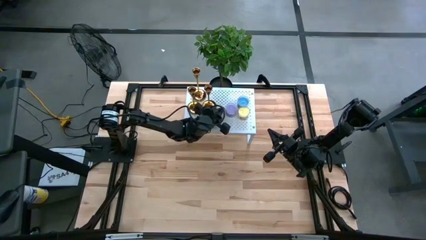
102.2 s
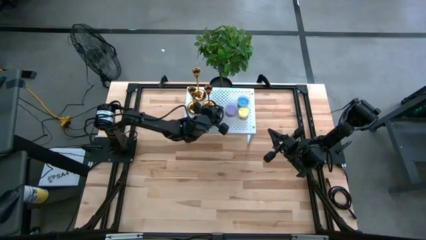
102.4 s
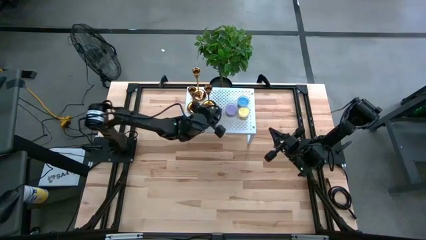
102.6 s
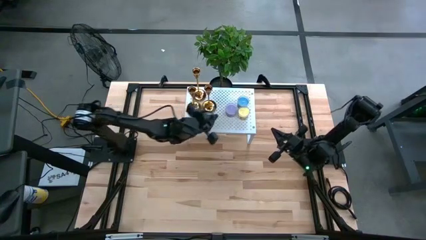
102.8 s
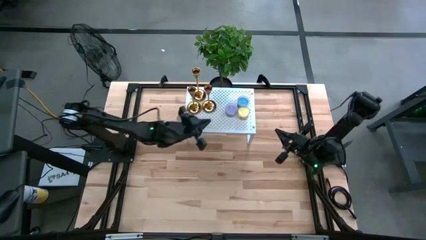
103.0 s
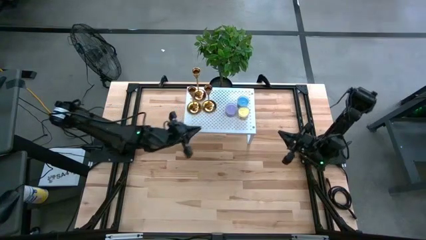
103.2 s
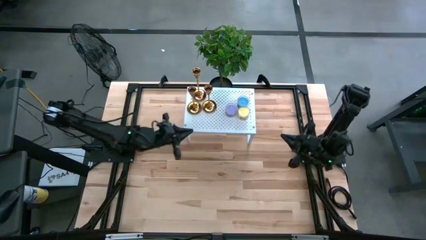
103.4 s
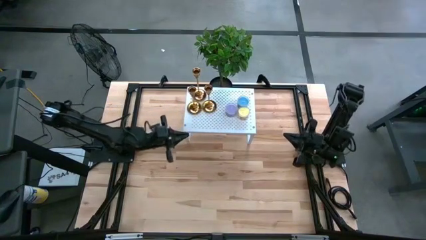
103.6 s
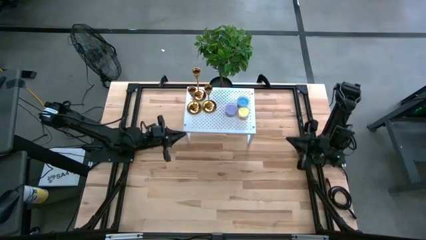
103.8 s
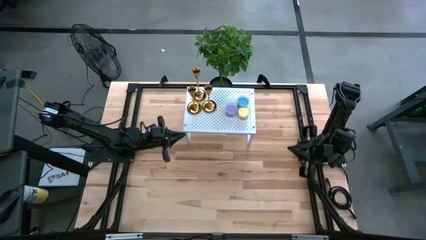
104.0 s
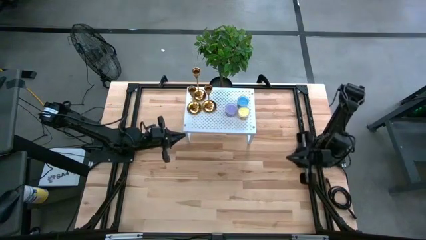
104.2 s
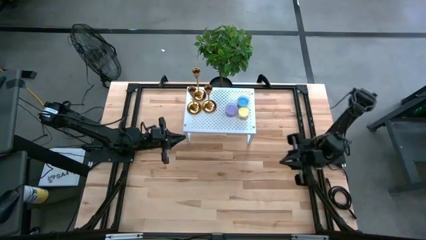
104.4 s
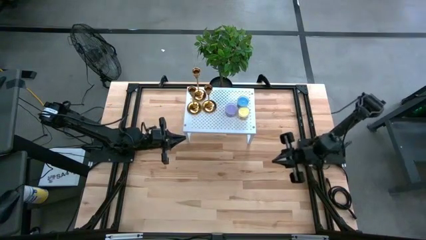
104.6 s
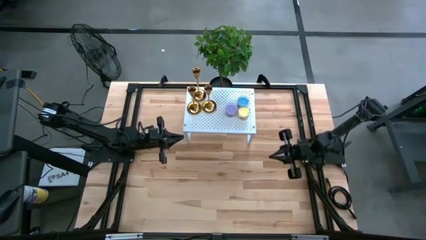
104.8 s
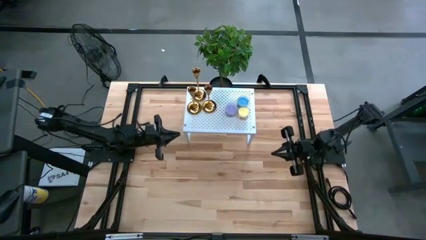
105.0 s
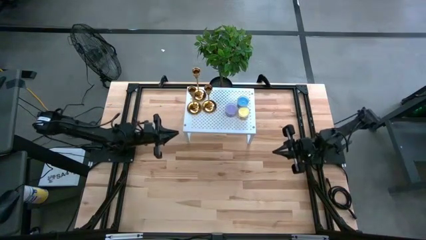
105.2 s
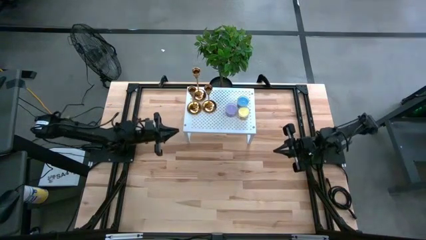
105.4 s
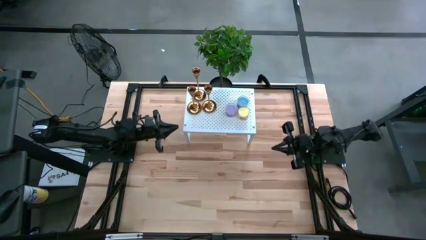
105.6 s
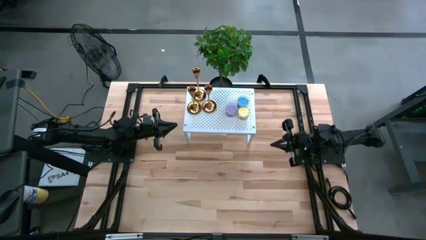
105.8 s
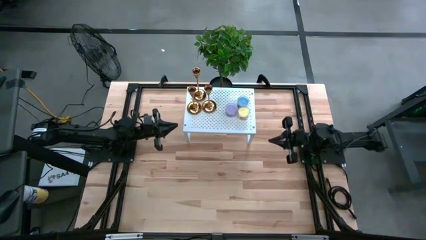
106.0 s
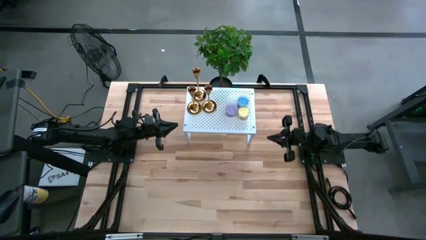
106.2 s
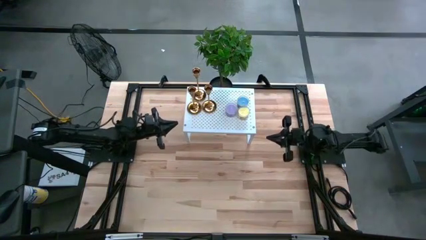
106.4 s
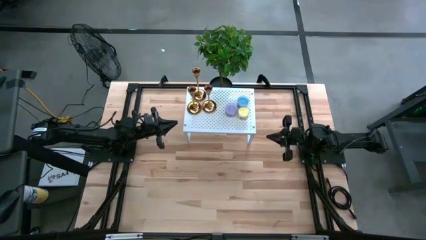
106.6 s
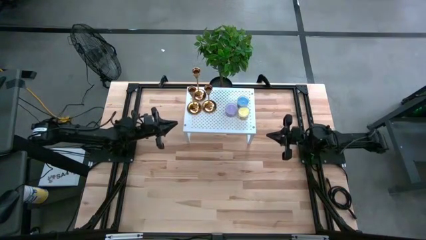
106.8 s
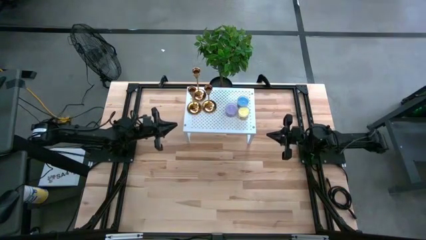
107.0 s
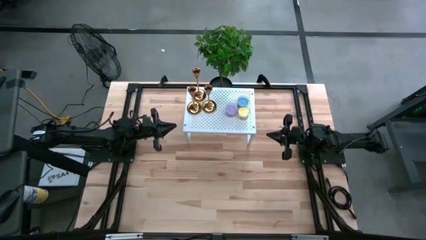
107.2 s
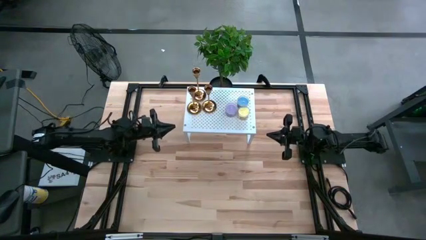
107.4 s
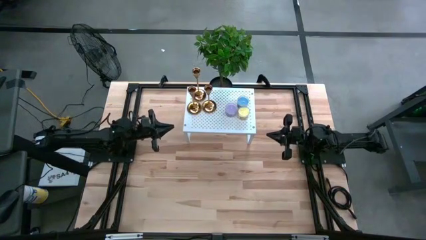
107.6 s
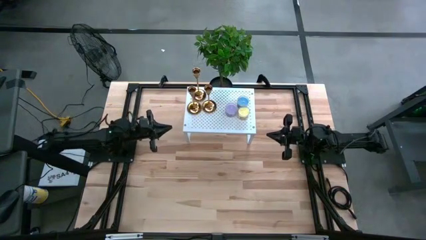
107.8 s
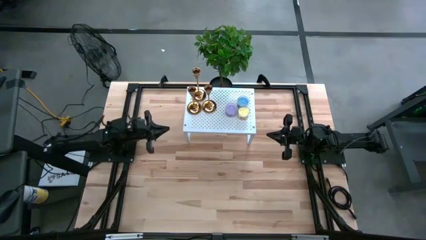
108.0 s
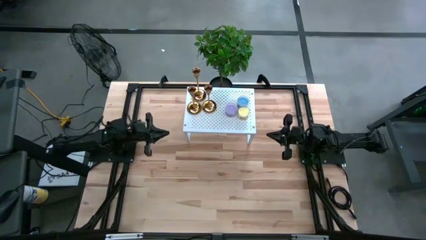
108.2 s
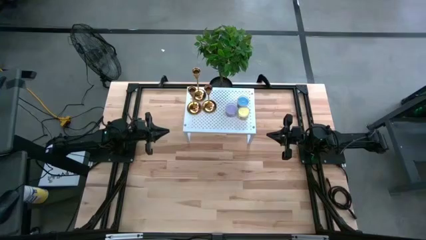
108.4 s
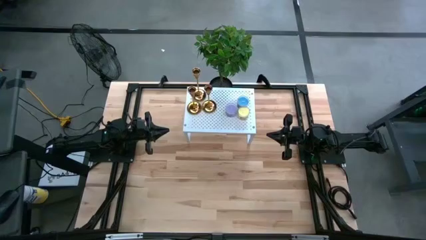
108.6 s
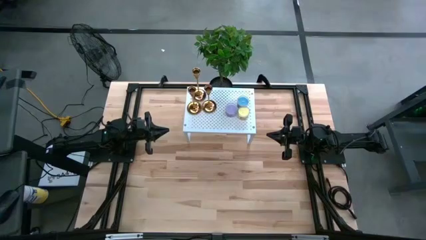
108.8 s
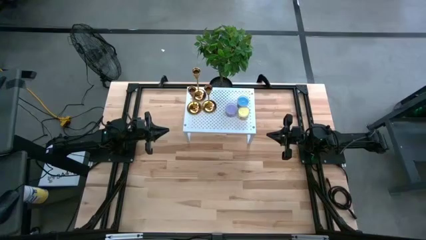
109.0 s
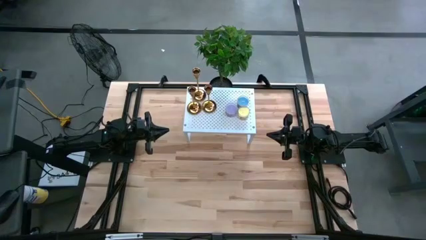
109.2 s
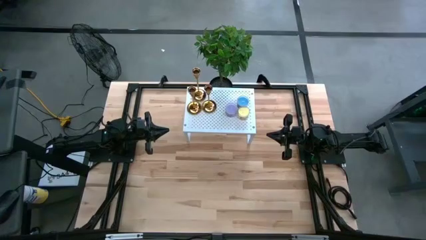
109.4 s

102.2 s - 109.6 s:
Task: Pick & Place candle stick holders
Return to Home Position

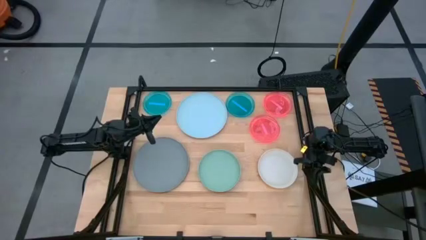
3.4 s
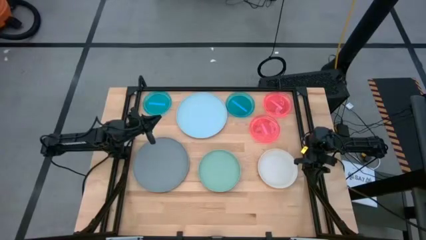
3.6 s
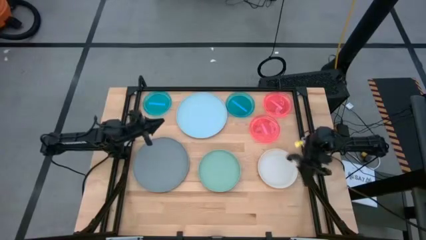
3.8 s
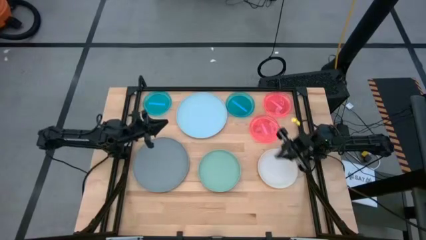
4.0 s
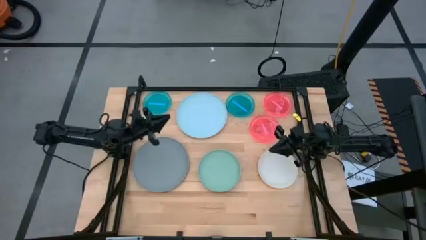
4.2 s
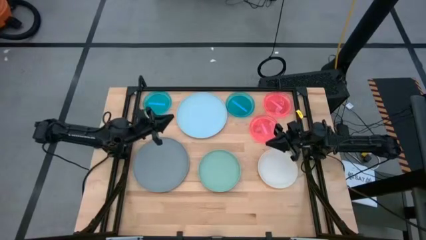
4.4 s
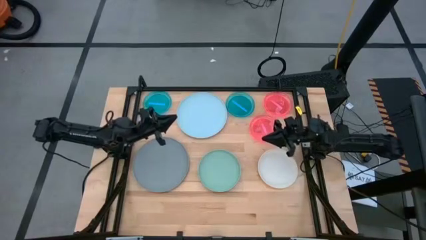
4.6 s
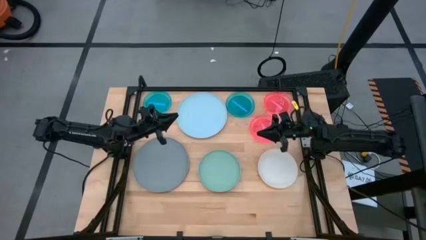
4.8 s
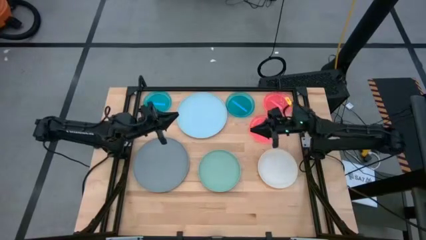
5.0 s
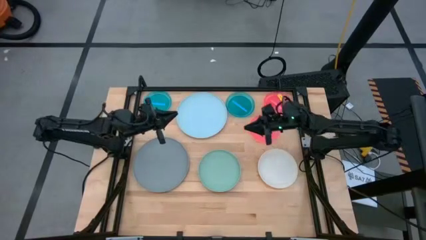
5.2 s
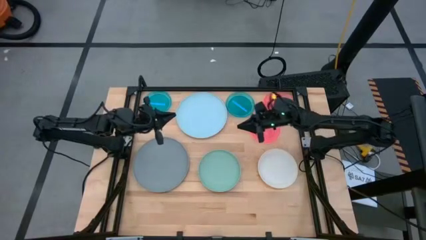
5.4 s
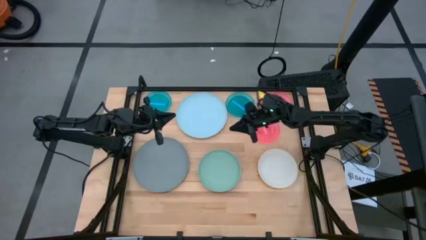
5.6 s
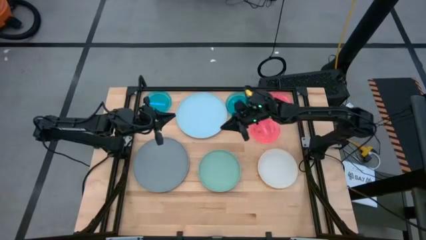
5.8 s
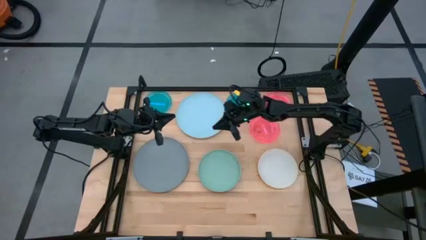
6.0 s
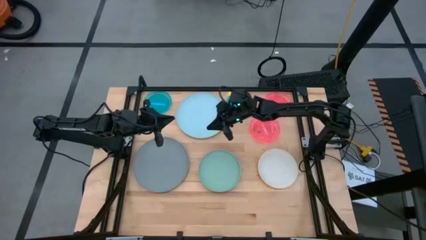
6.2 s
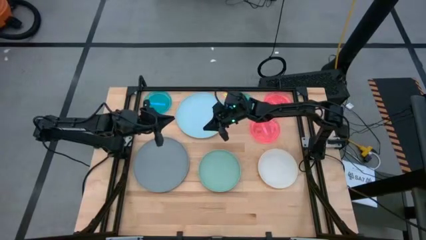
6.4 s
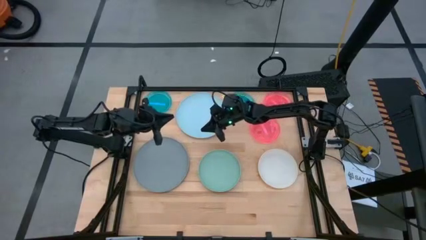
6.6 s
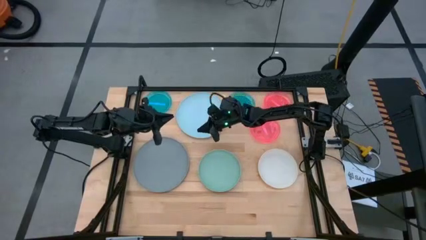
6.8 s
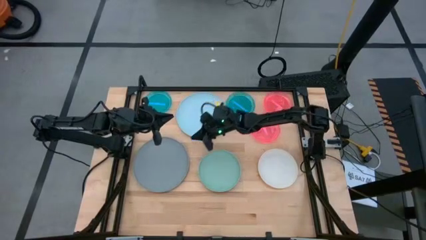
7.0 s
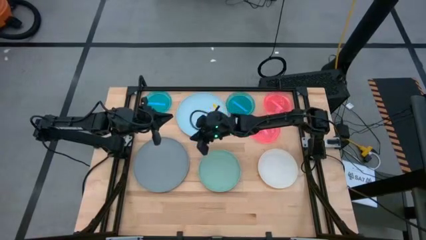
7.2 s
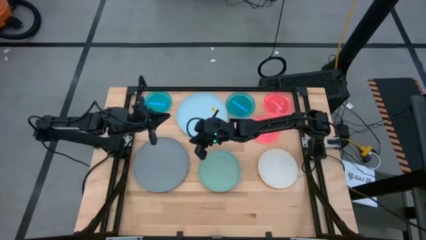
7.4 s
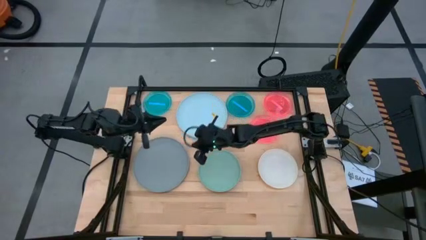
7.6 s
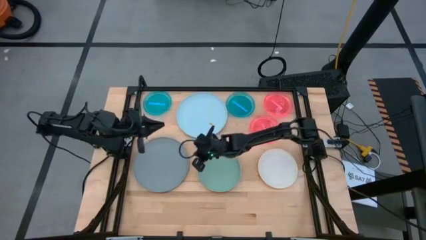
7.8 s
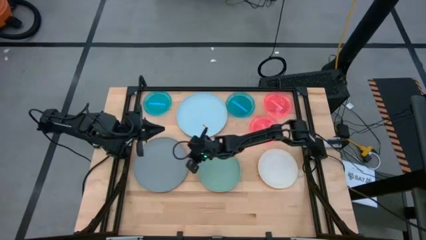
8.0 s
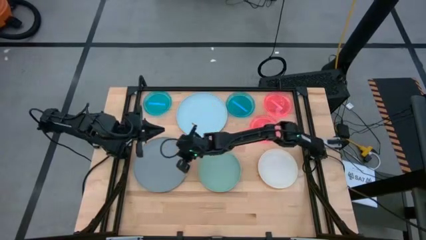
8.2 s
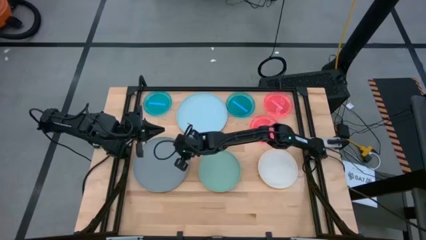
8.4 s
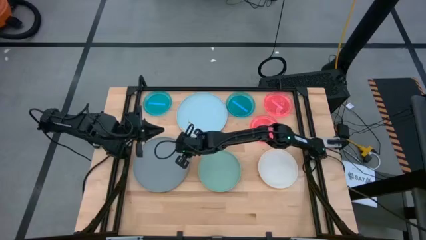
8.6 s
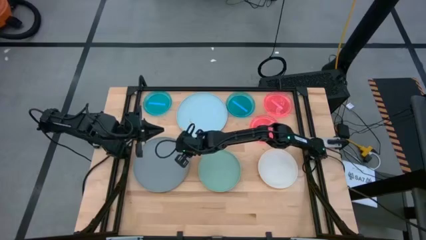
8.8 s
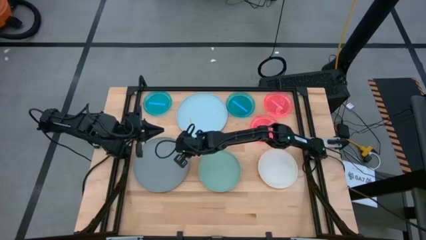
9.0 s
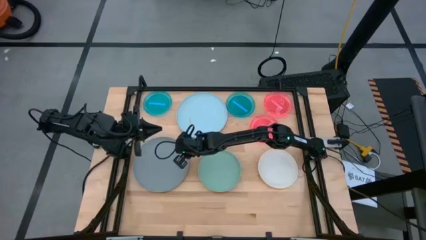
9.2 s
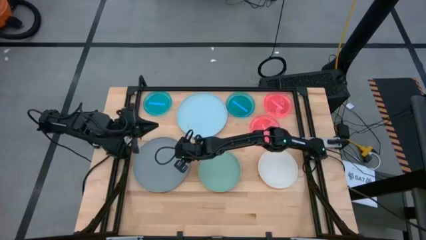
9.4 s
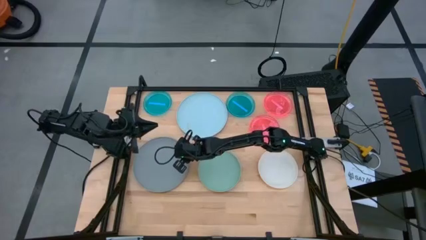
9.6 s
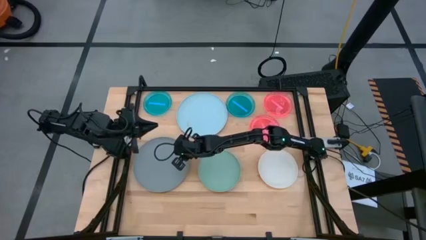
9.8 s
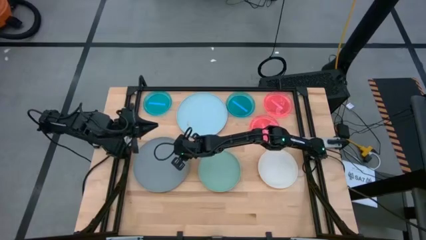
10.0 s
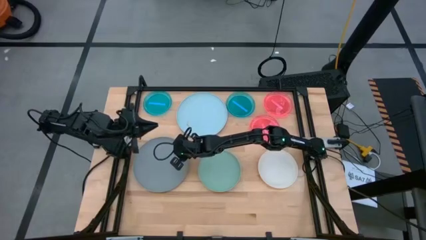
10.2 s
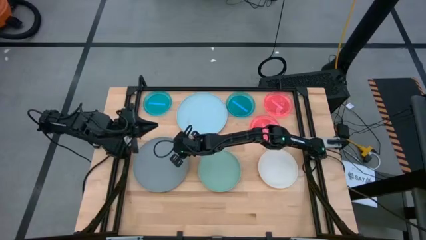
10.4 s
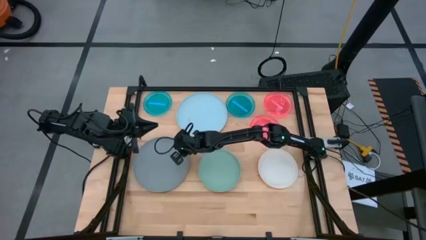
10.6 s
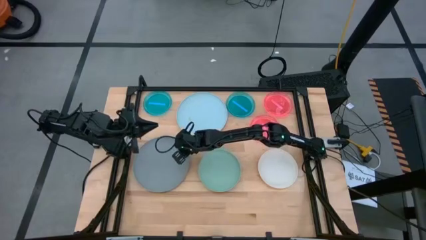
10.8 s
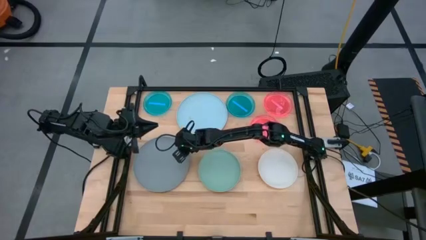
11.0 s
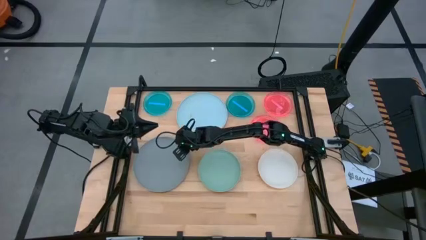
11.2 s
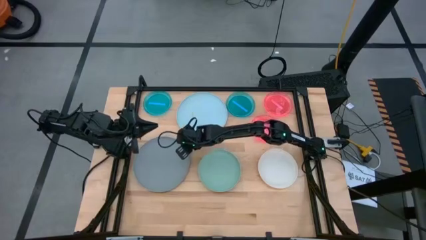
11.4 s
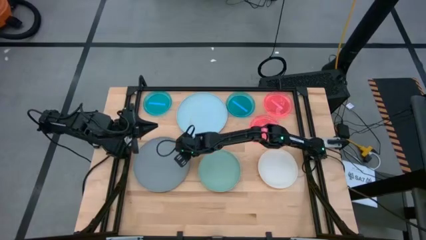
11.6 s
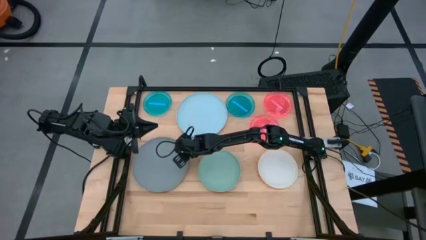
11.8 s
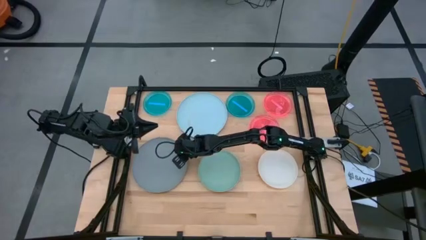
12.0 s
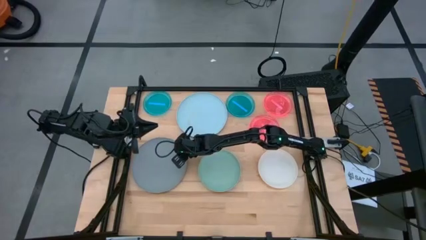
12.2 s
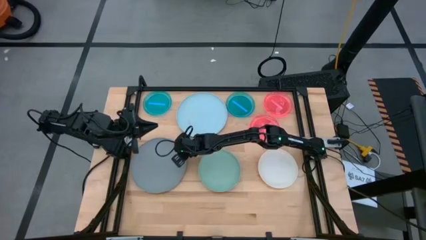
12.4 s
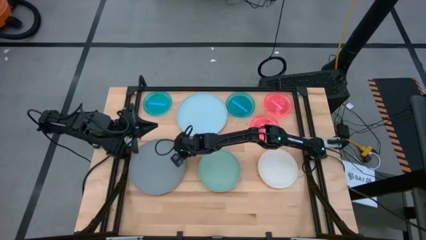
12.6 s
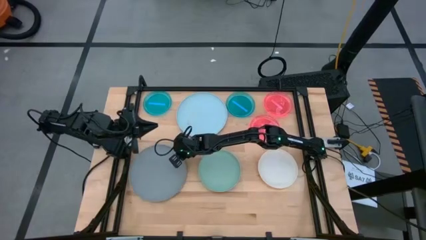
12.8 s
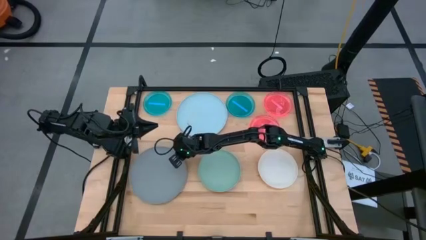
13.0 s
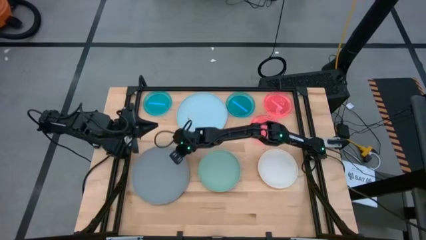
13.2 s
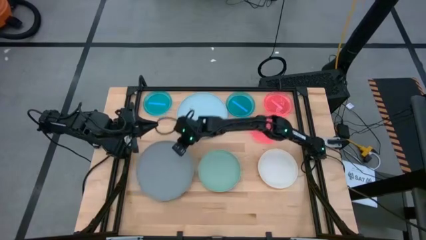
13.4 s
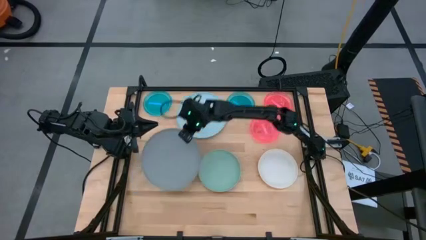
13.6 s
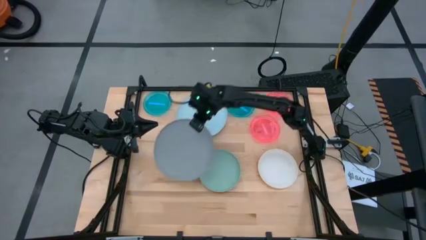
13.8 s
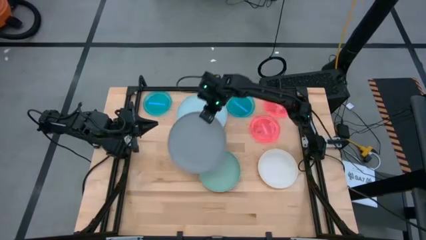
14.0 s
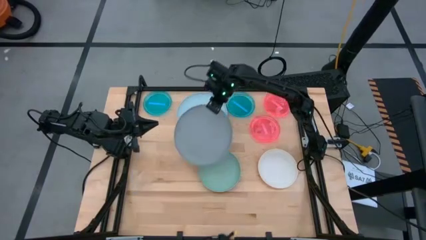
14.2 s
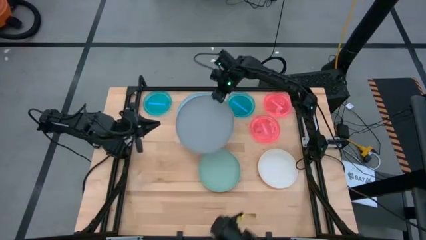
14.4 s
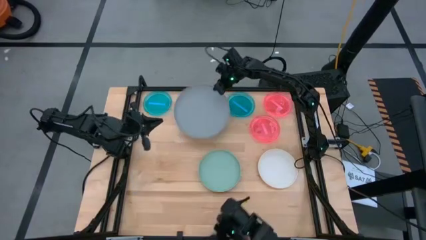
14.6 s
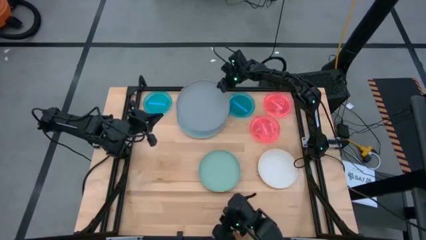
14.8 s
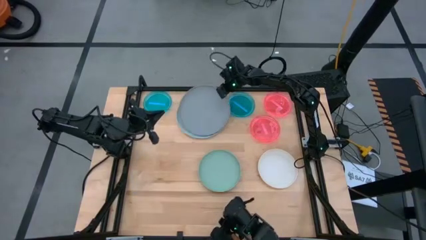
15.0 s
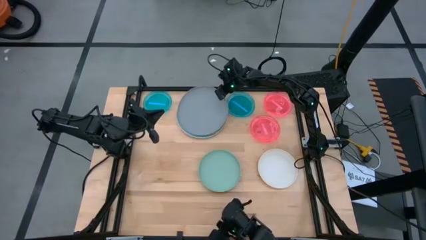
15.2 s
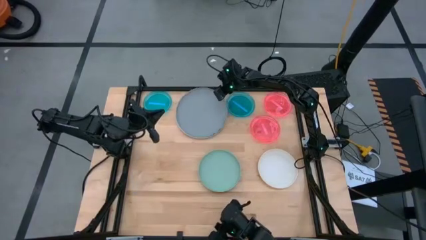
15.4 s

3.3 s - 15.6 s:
Task: Stack plastic plates
Stack the gray plate on top of the light blue plate
